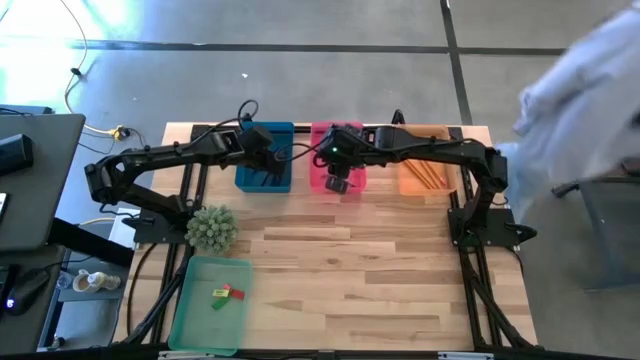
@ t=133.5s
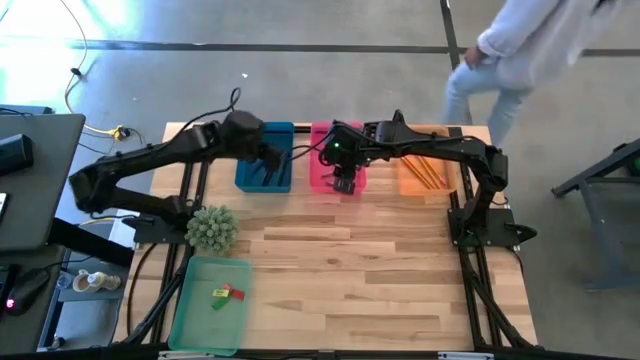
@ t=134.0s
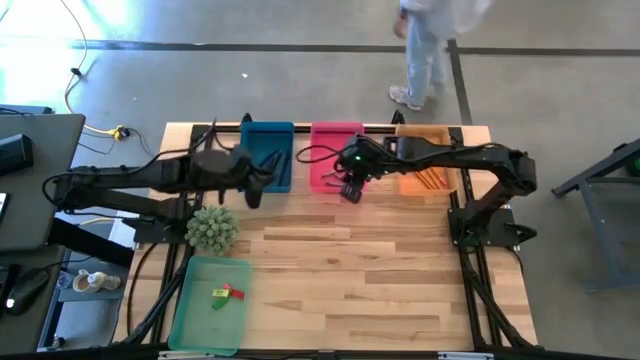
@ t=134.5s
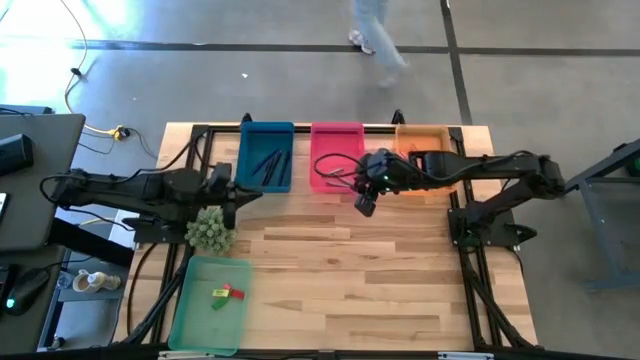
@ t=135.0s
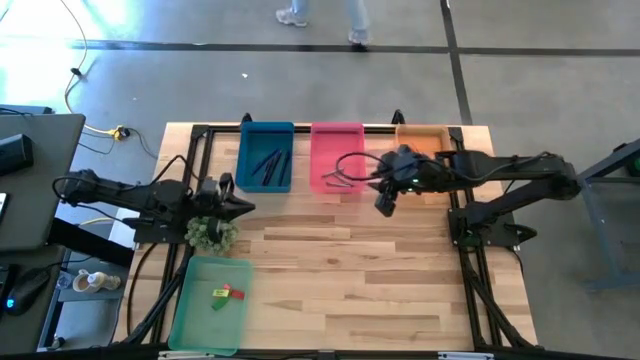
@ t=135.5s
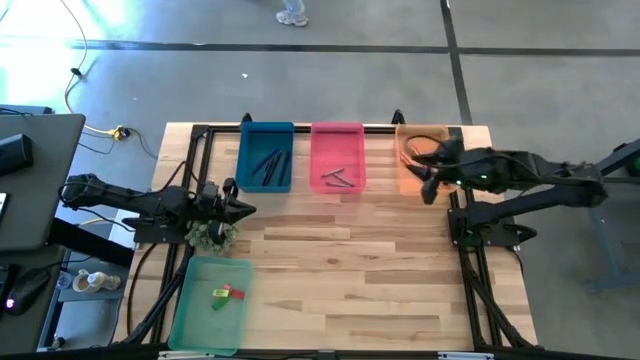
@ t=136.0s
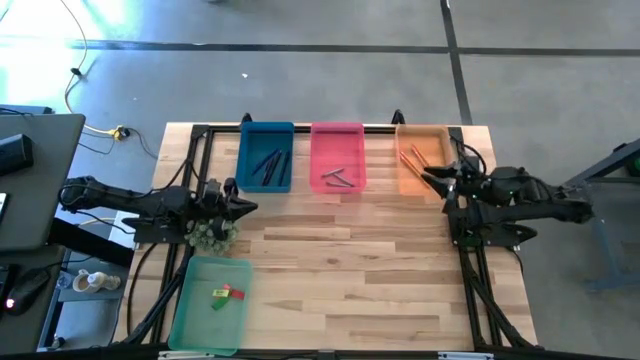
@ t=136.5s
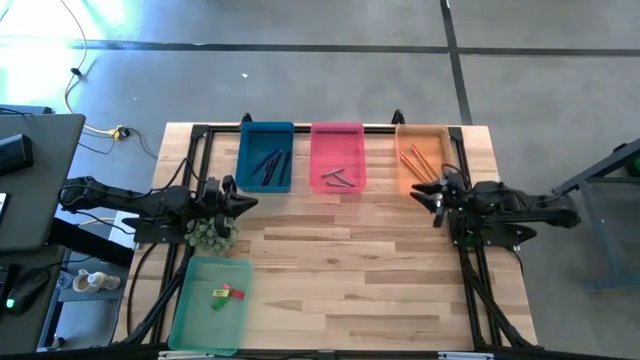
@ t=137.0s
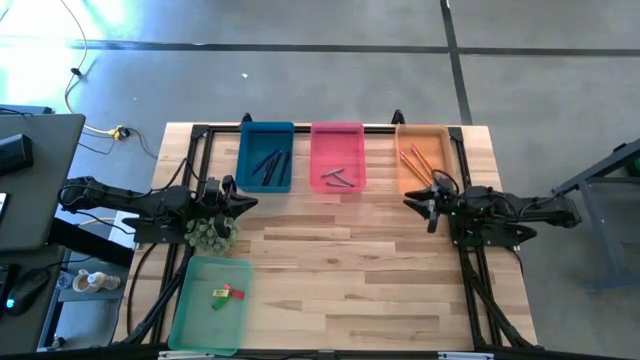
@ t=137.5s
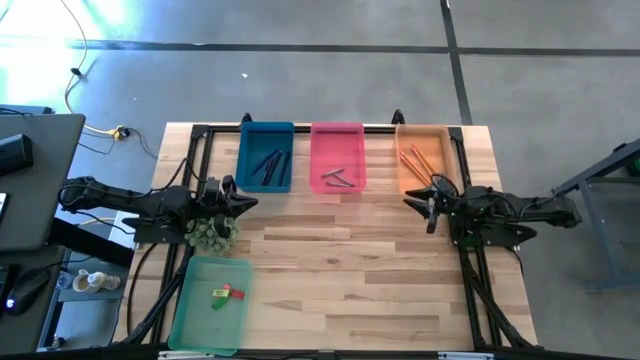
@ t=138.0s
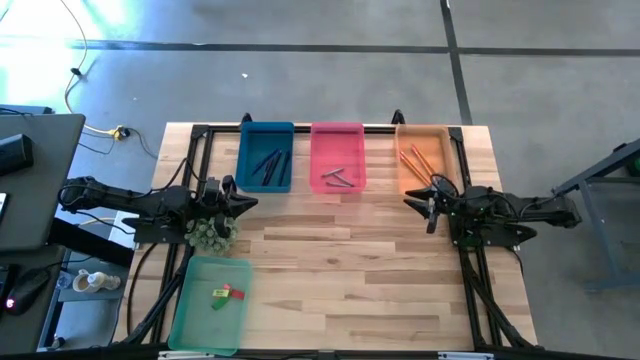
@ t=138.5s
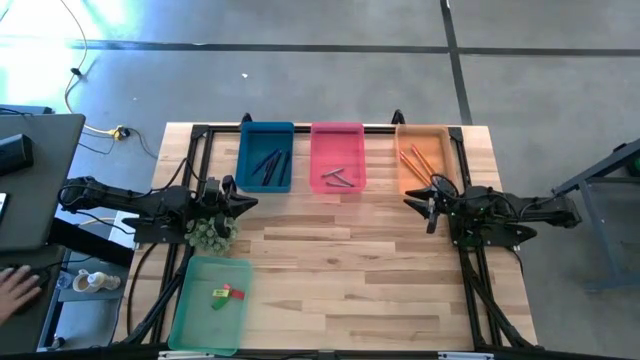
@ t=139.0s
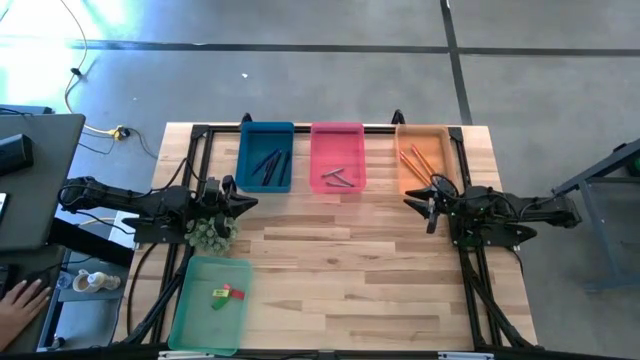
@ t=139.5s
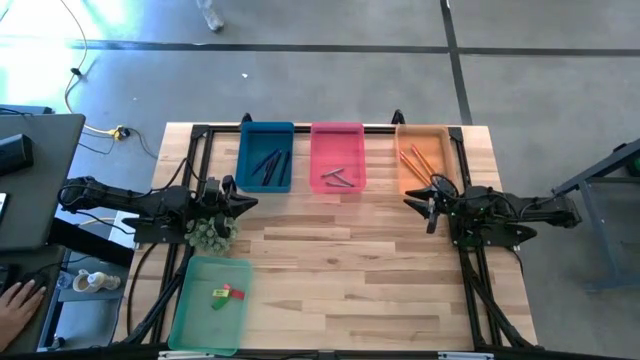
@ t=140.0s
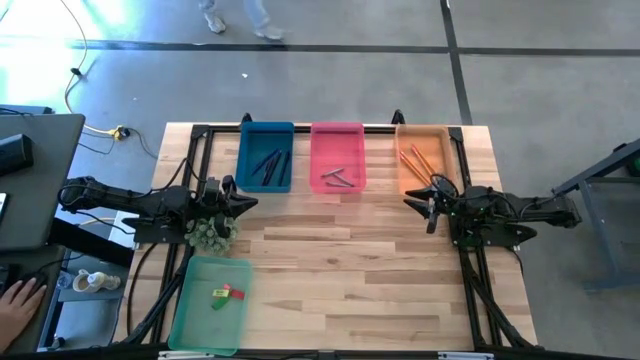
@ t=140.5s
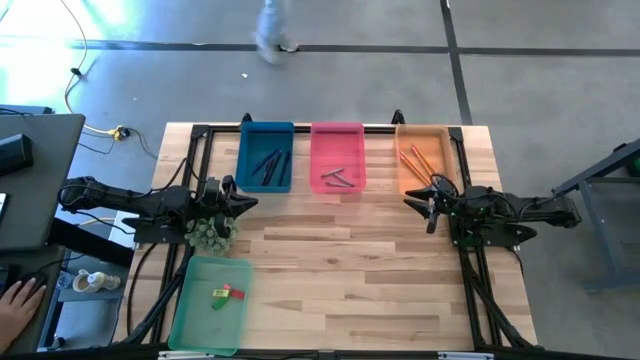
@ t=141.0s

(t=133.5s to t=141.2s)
Task: Sort crayons/erasers/pens/pencils in bins
Return to Home Position

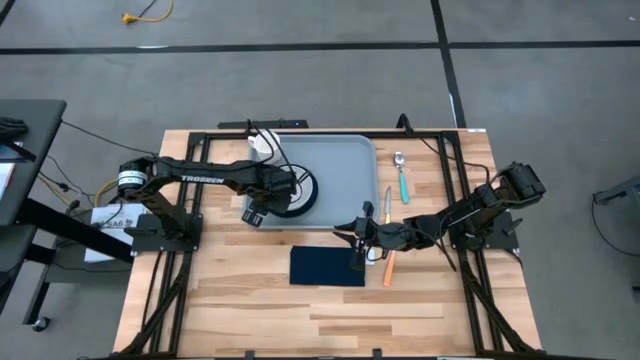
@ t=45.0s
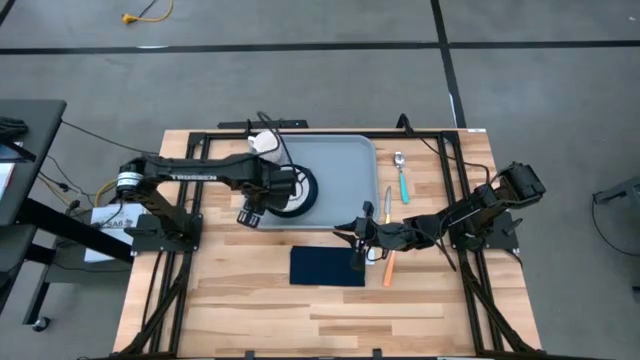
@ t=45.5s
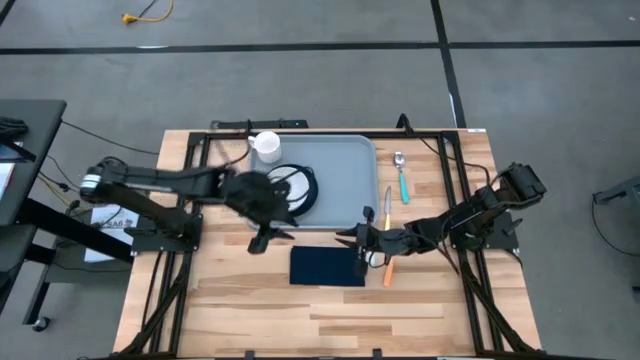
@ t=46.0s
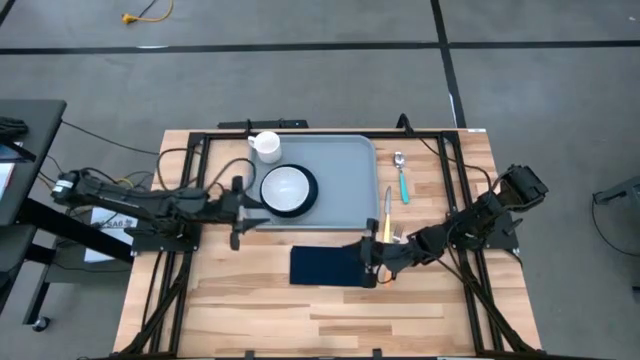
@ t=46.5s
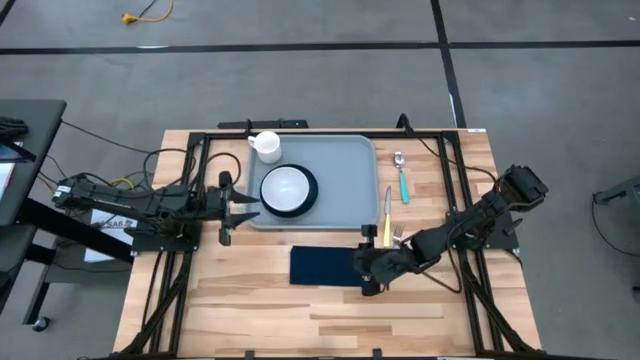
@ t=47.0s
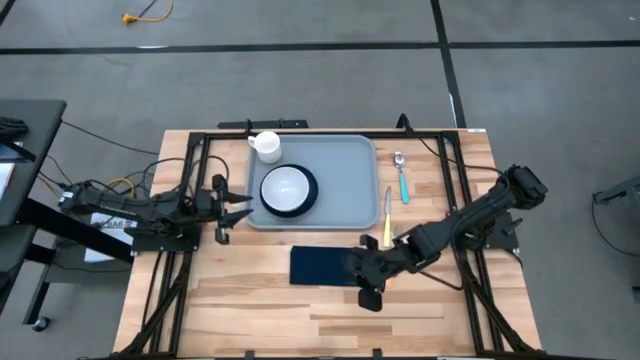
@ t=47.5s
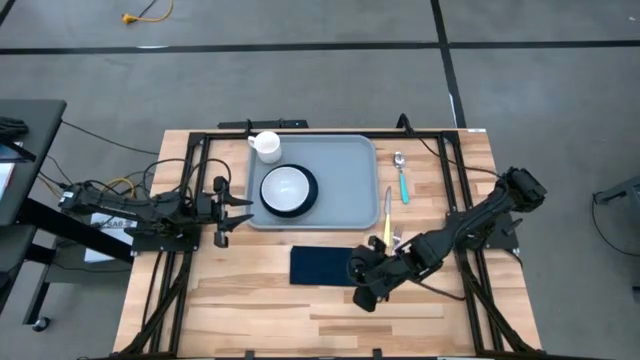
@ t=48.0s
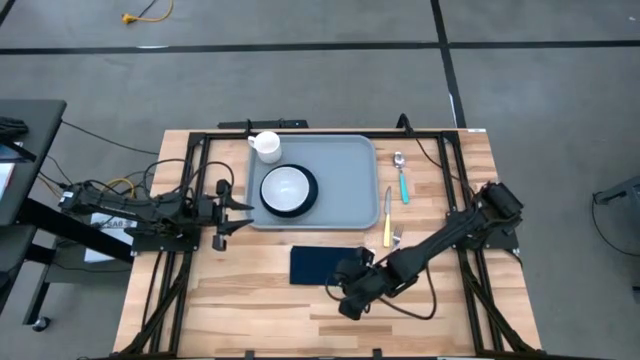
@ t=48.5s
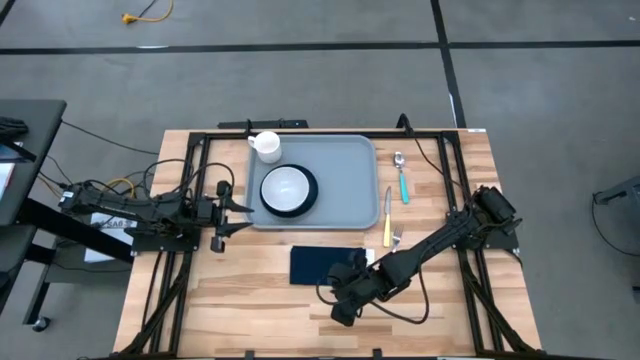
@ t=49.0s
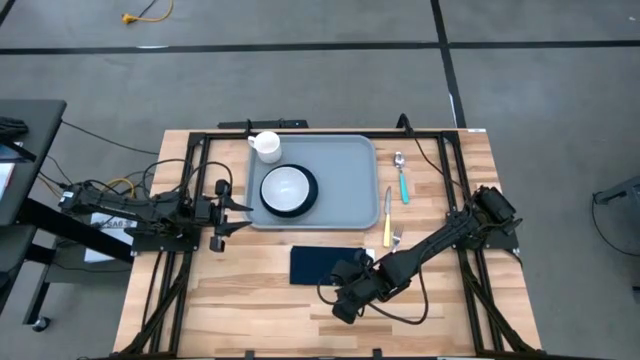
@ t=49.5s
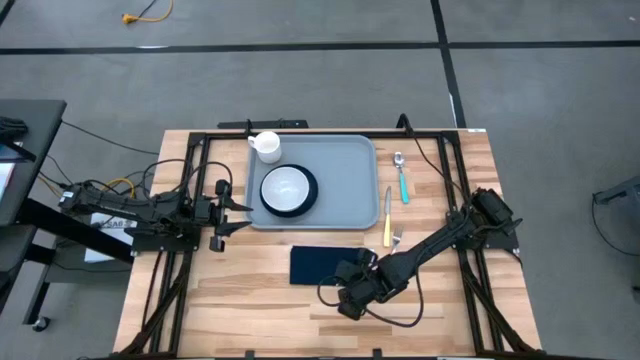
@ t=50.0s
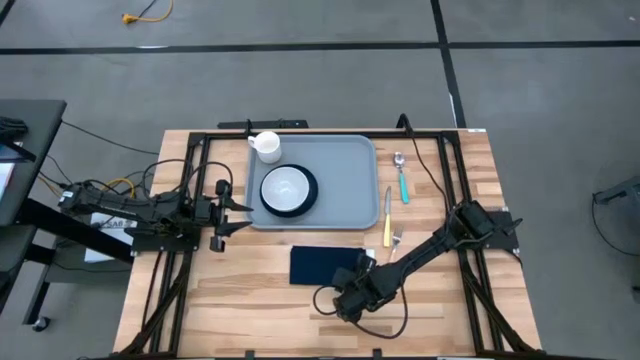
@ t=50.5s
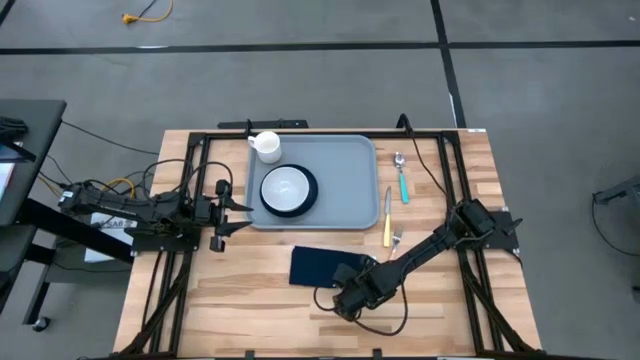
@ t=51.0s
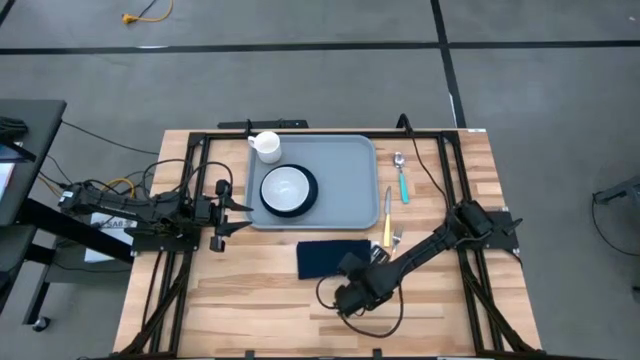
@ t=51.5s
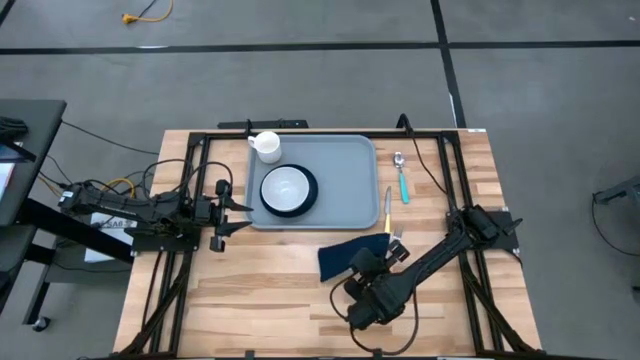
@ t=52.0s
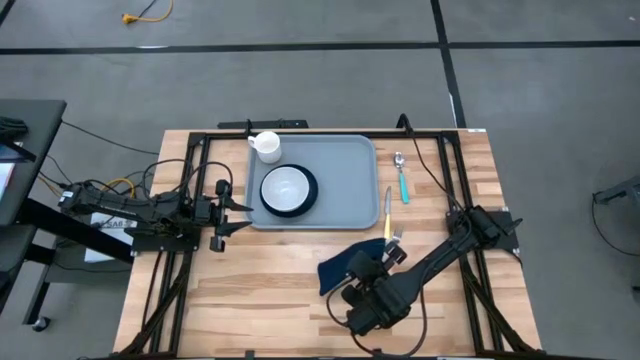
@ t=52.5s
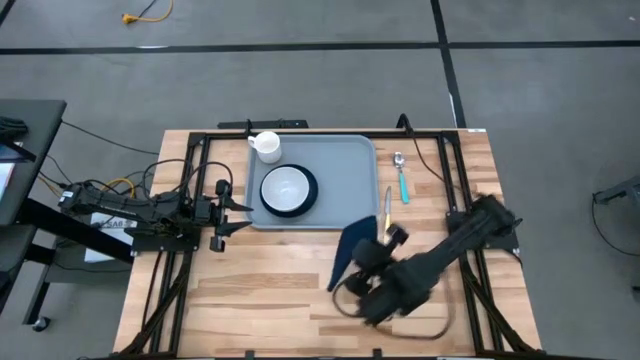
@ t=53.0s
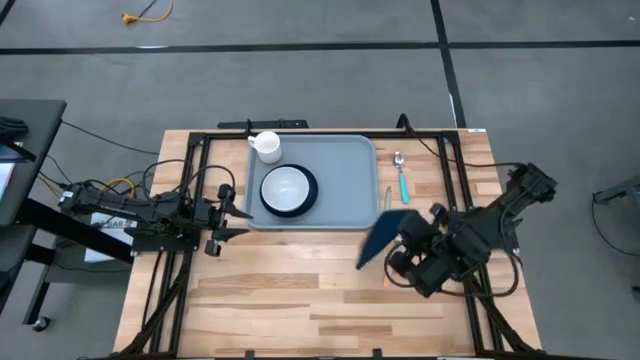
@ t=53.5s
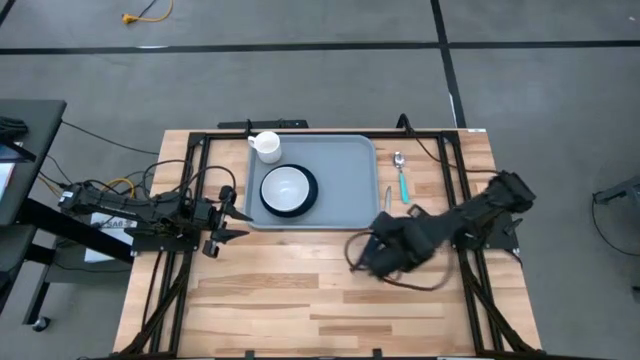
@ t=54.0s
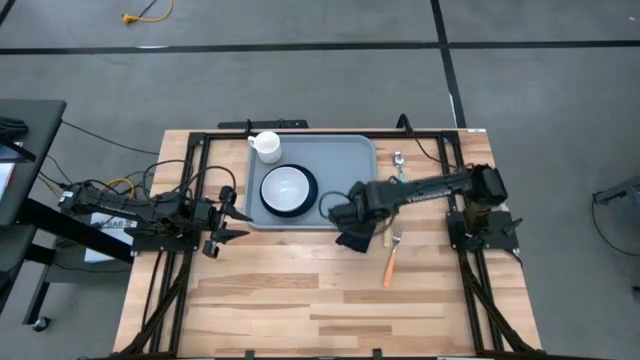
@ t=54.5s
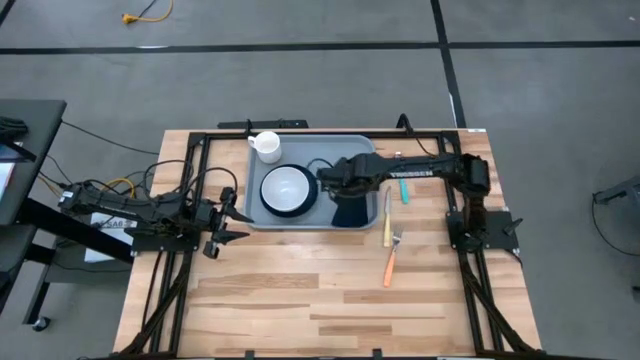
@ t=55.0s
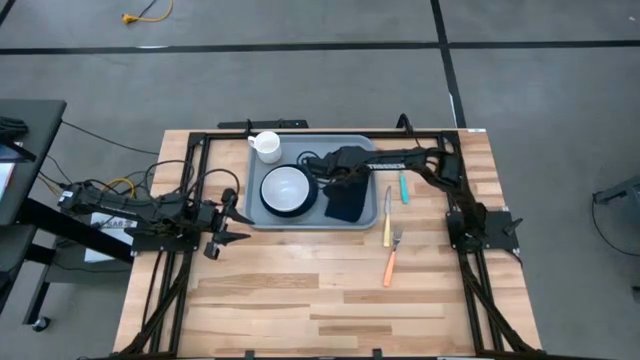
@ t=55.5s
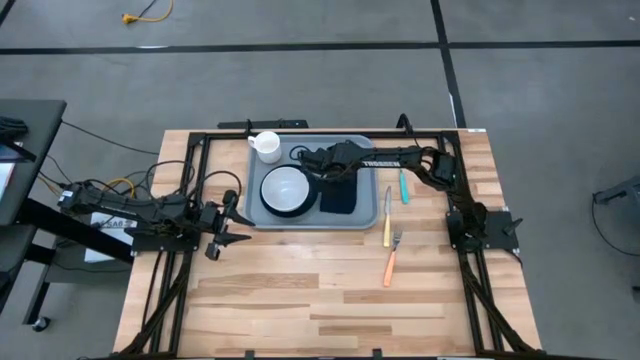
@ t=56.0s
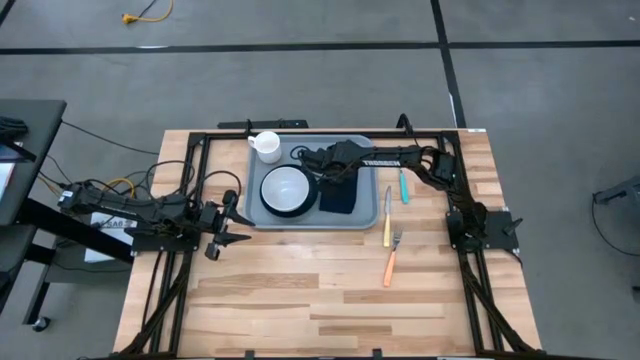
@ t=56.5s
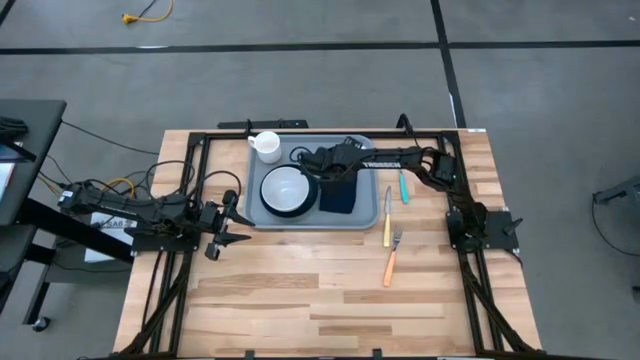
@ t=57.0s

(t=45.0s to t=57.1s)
Task: Set up tray
Put the dark blue napkin on the right side of the black plate

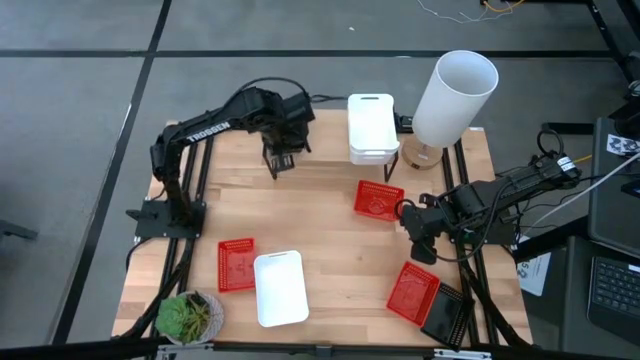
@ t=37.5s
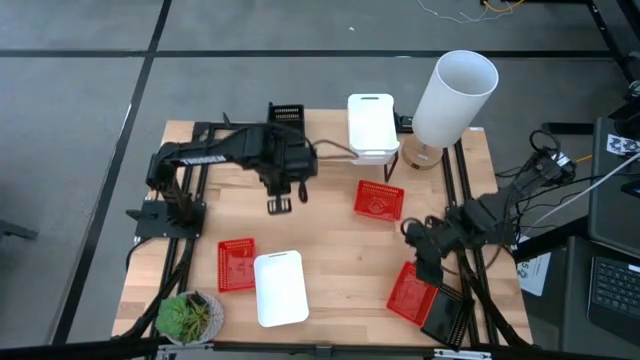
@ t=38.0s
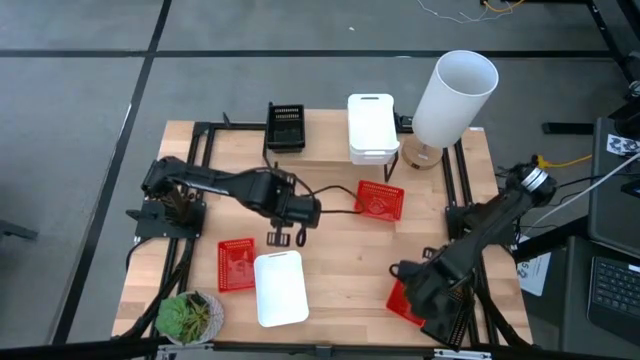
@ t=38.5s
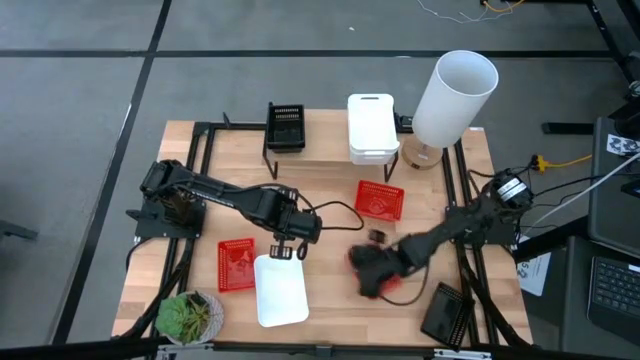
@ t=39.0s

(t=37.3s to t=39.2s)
Task: Stack baskets on shelf by color
Move the bottom right red bin to the middle of the table
